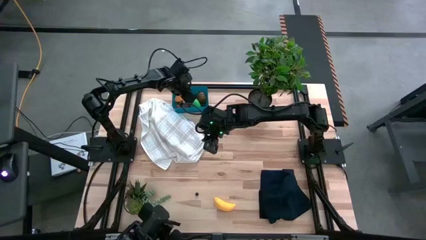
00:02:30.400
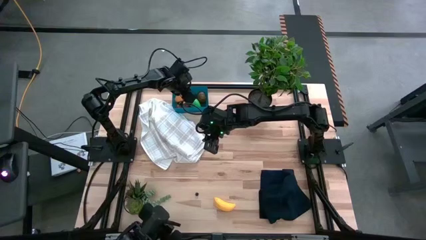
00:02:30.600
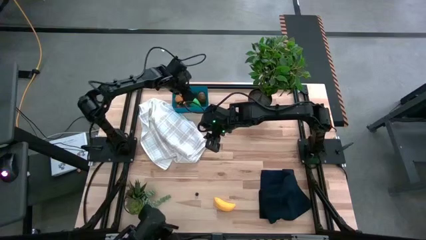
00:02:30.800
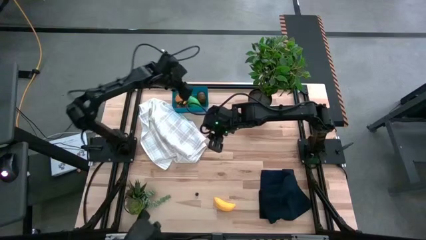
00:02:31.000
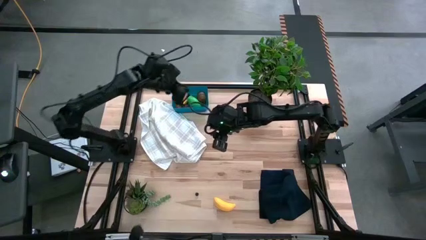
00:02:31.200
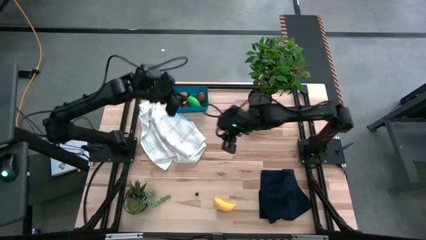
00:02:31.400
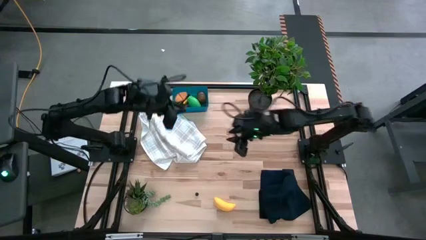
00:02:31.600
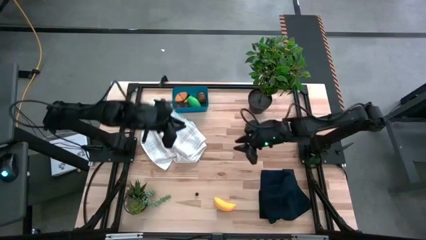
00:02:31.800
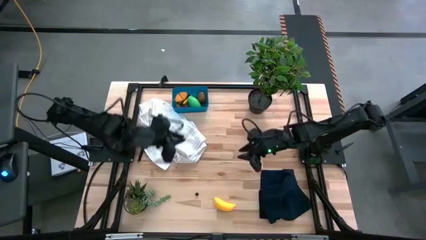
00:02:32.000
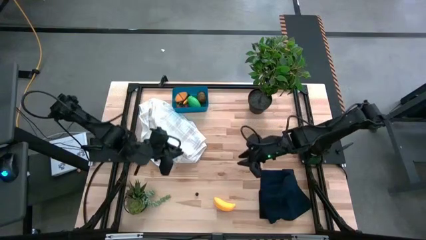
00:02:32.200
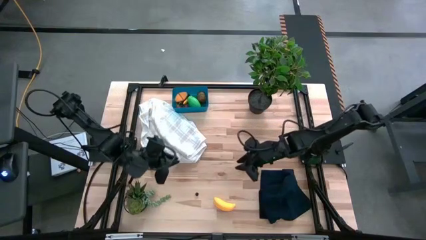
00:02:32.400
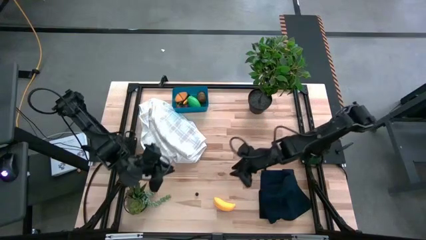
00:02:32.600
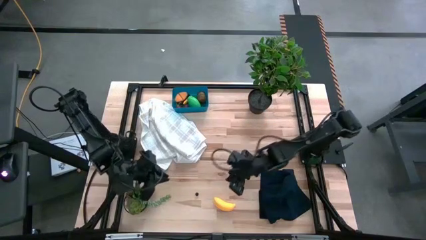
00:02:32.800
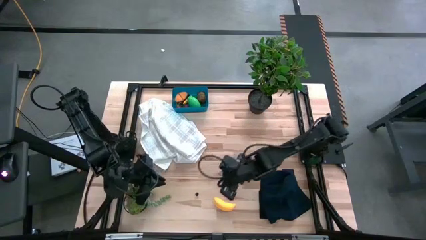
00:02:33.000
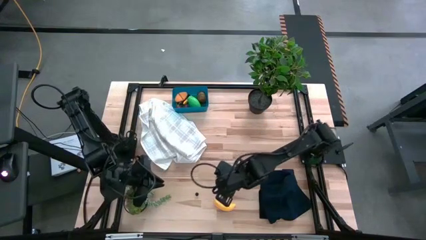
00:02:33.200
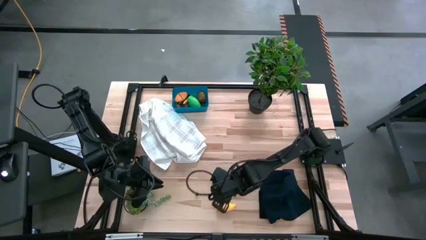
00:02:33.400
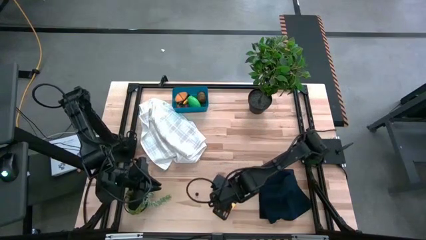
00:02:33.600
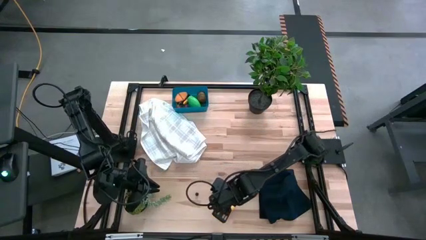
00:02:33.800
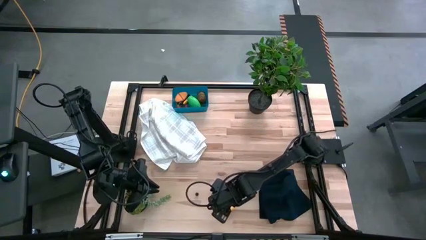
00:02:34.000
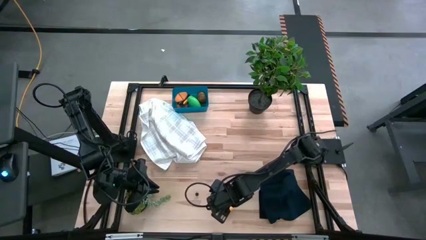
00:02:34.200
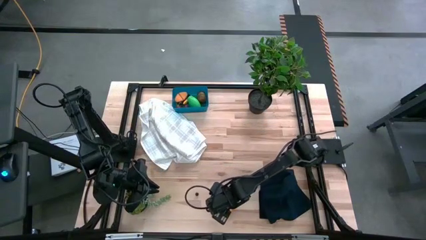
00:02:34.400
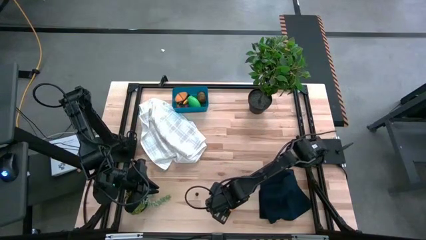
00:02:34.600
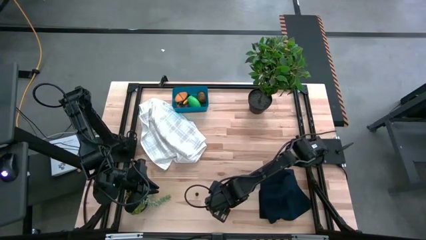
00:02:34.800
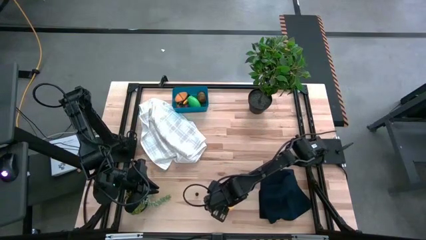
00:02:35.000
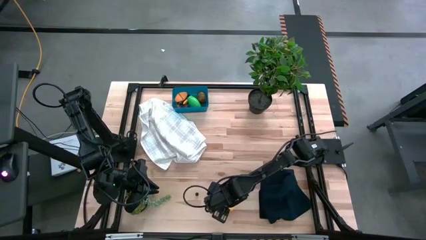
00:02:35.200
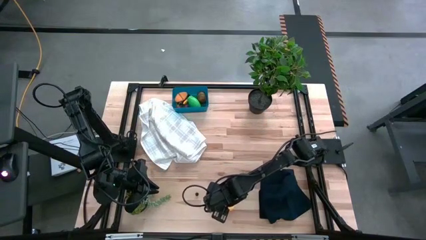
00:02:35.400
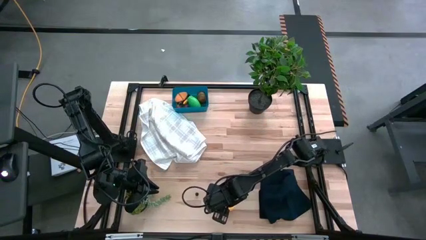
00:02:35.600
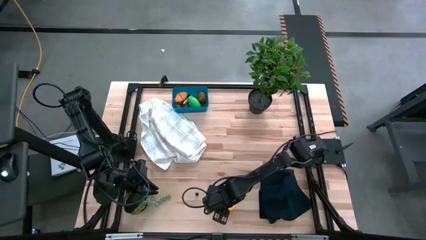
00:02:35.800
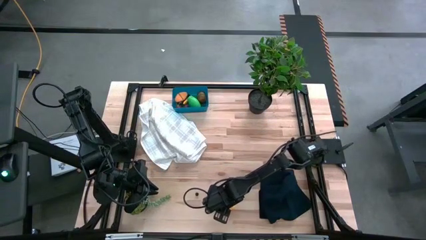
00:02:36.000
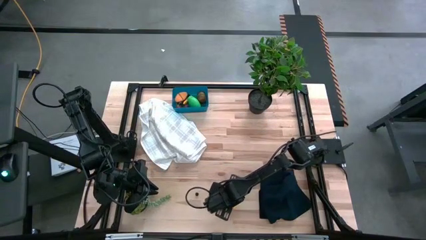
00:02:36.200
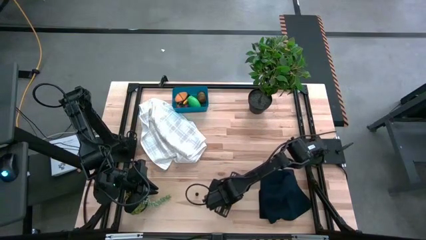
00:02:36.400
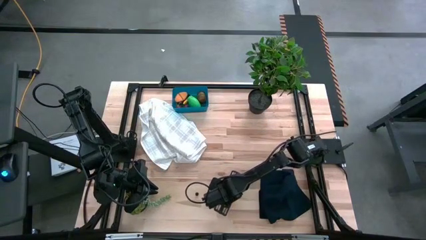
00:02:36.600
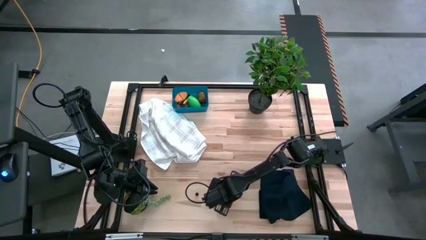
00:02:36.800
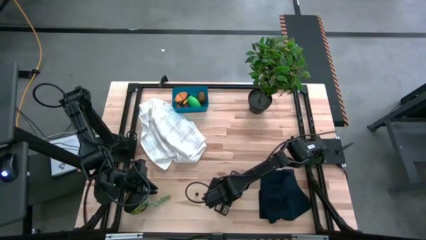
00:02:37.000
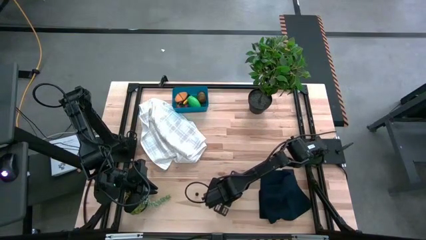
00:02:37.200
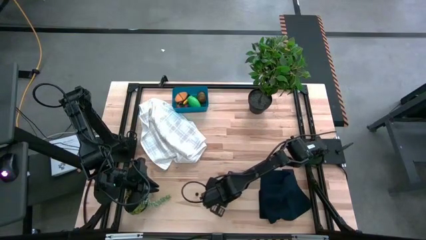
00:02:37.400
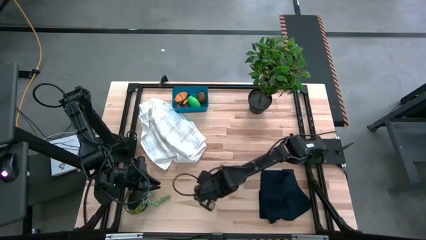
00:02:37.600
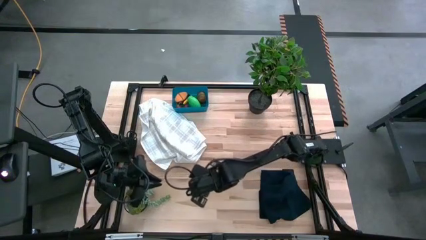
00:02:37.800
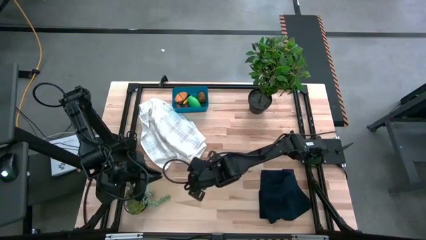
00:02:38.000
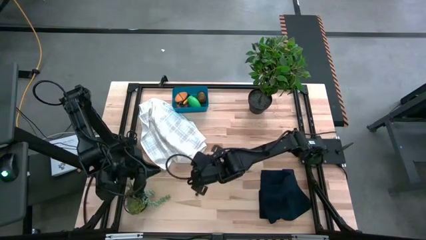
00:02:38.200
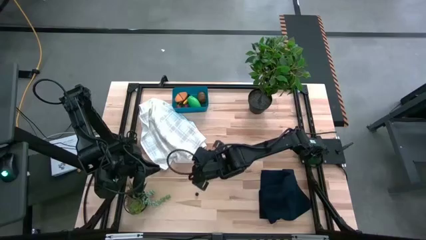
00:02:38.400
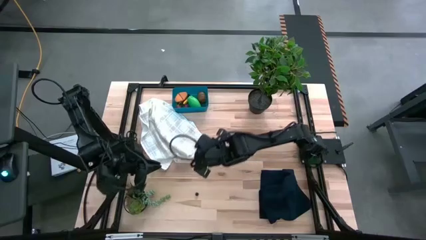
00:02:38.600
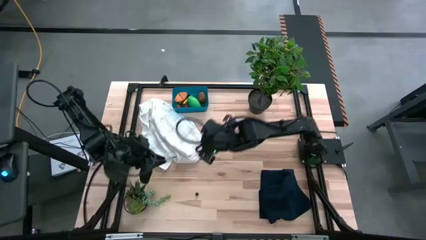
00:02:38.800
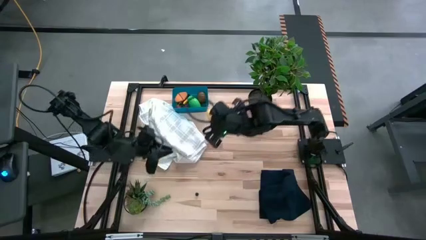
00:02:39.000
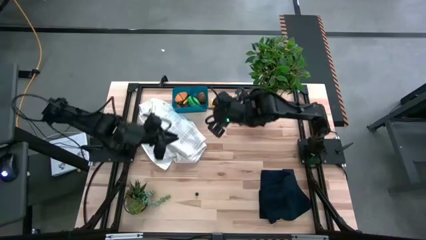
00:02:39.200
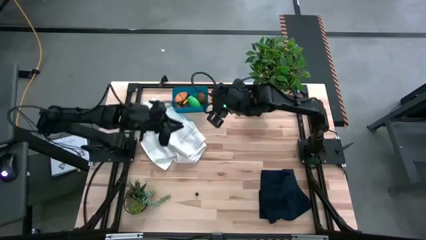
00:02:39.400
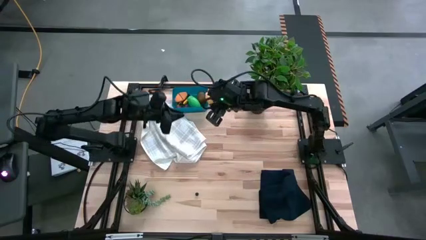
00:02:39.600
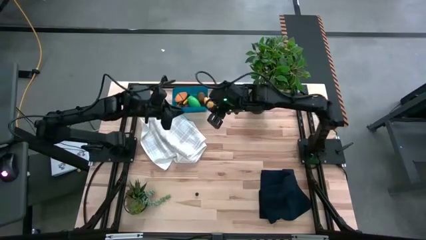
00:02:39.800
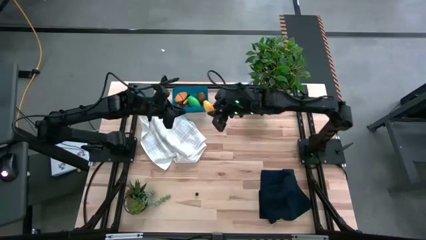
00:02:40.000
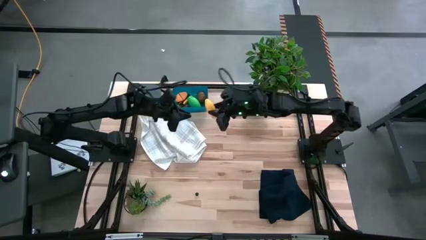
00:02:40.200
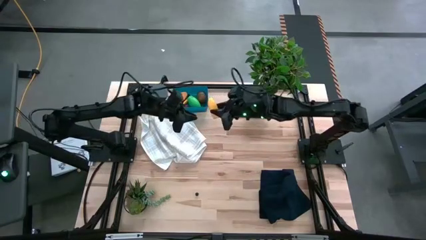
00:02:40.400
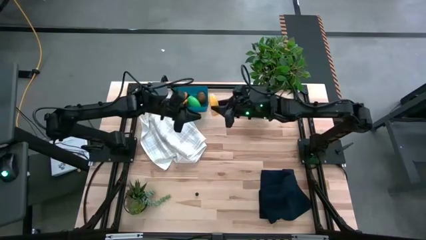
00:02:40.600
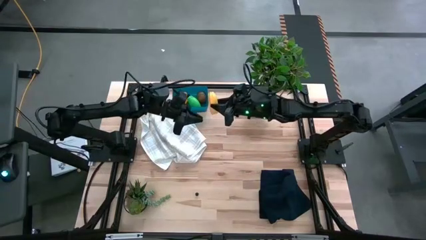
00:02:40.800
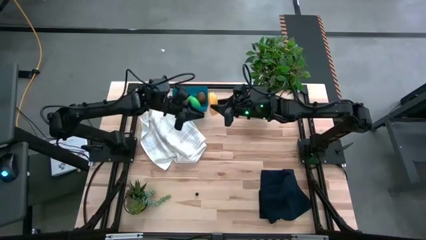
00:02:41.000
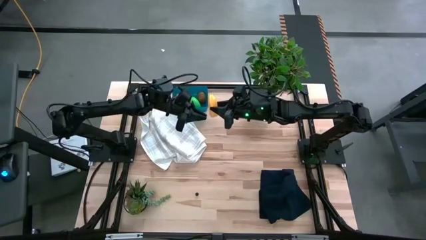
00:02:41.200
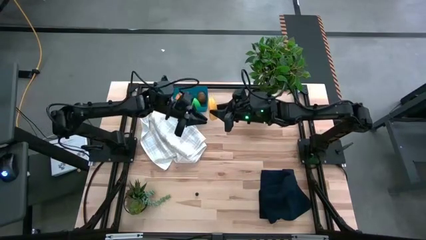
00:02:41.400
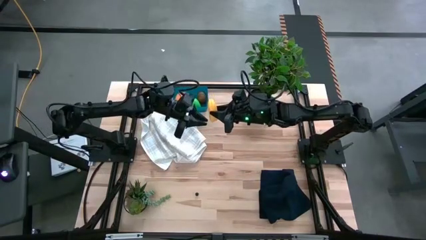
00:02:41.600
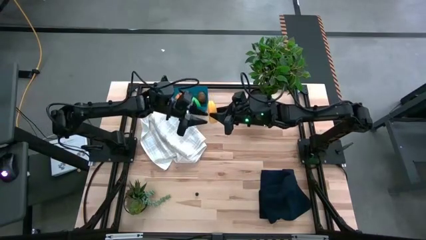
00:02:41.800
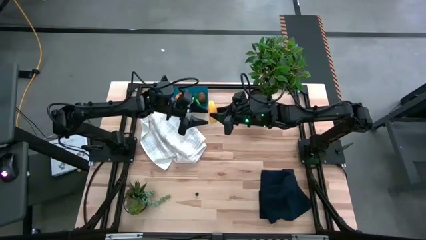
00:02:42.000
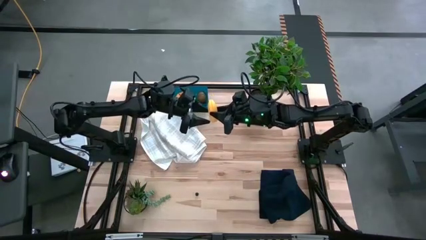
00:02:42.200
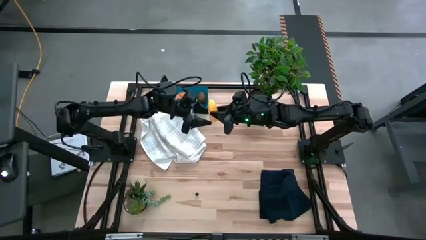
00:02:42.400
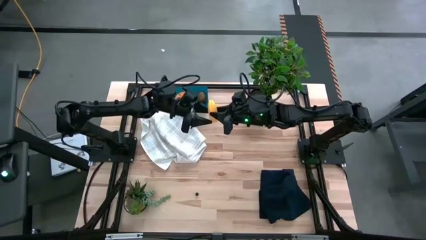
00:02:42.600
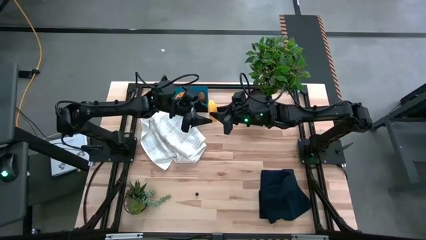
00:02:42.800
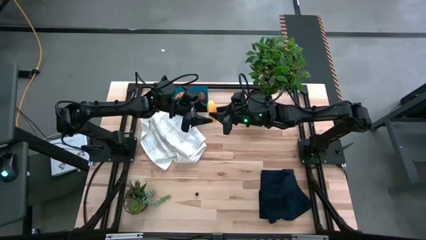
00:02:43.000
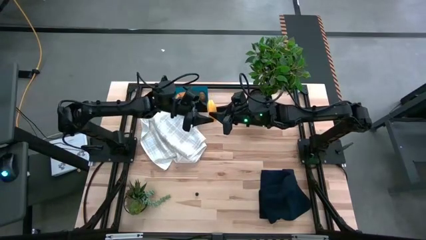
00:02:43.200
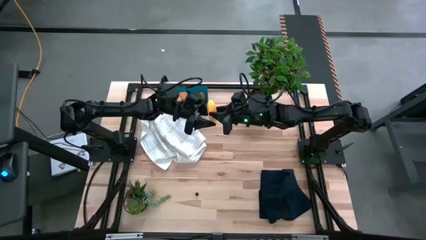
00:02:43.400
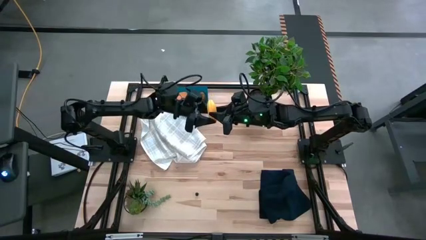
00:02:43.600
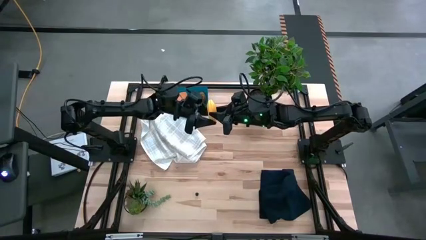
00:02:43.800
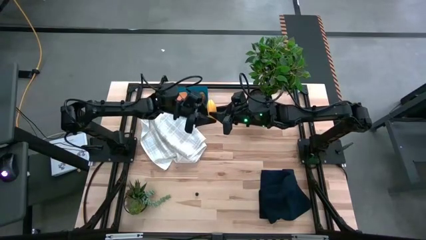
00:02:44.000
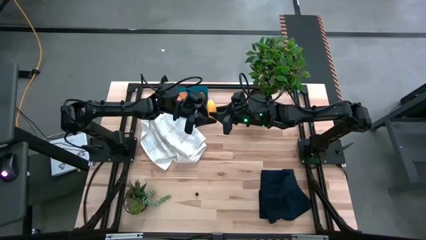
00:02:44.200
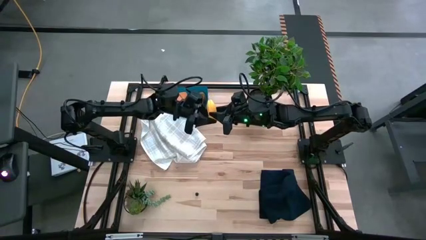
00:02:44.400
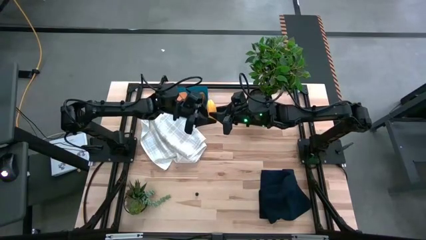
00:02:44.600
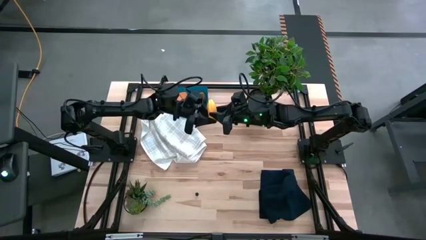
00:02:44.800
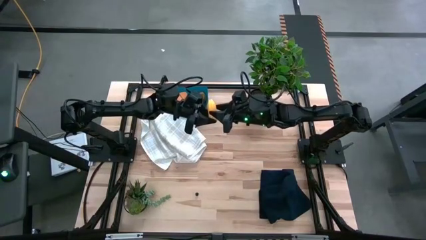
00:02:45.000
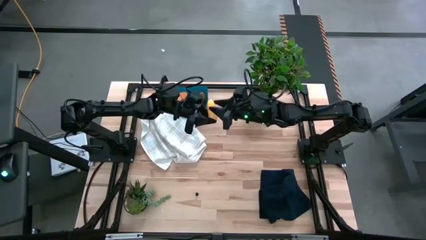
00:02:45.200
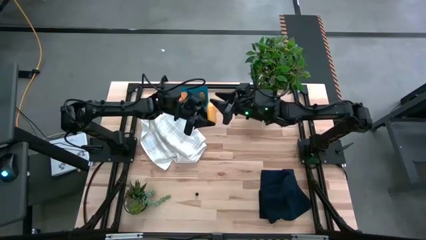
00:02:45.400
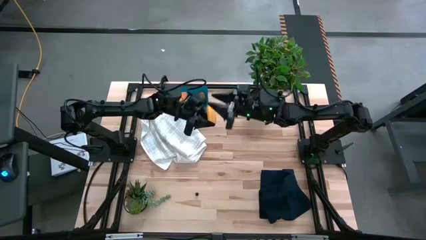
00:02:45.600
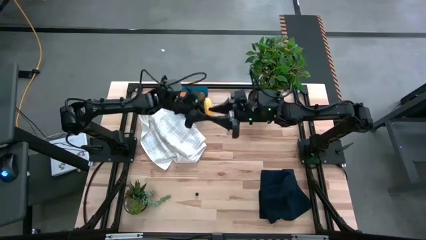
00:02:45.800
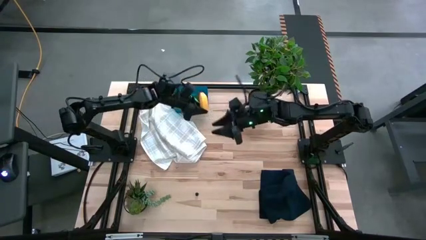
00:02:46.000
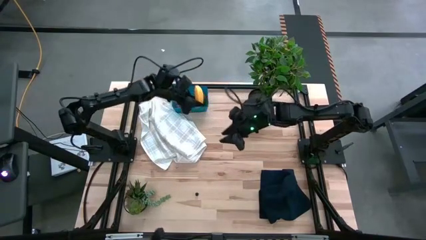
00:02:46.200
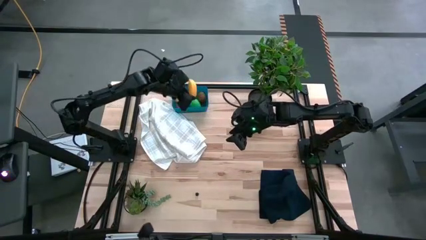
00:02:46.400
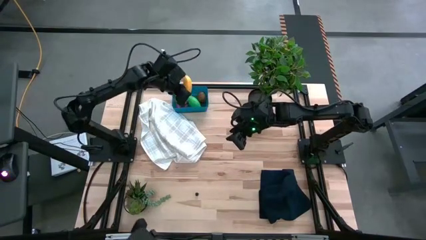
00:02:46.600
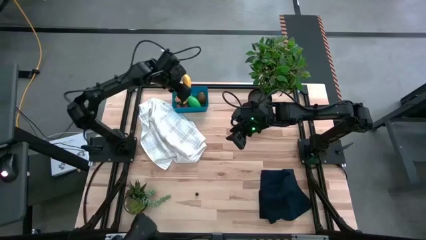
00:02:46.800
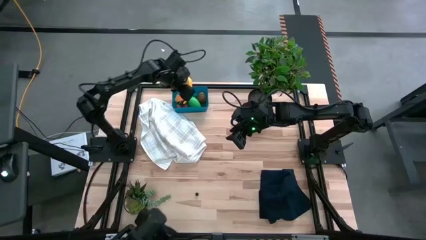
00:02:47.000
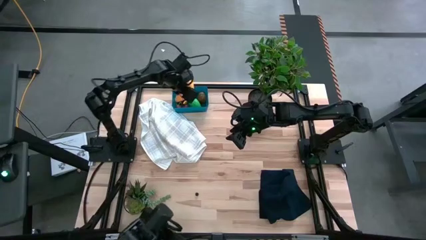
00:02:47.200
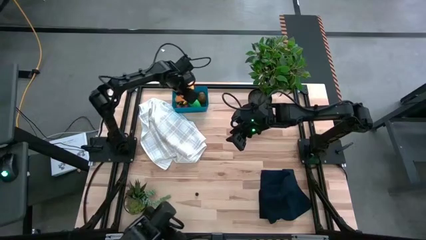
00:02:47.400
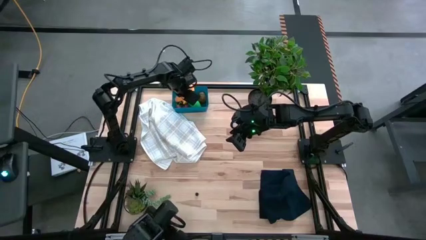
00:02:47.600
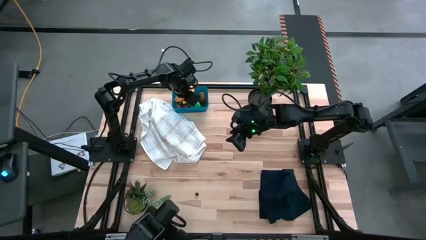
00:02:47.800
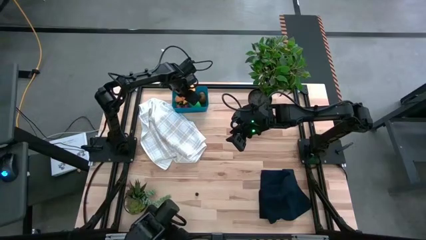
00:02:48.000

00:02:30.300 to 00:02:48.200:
Task: Pick and placing Produce into tupperware
Put the yellow banana into the blue bin
